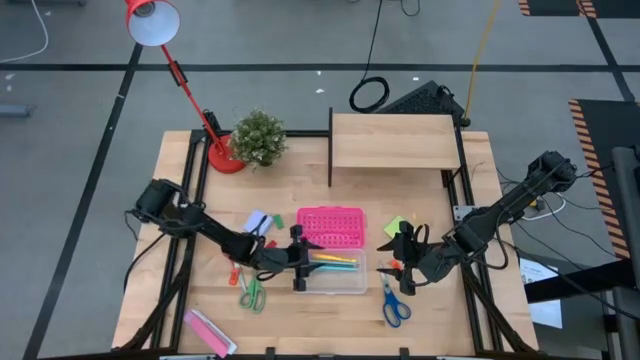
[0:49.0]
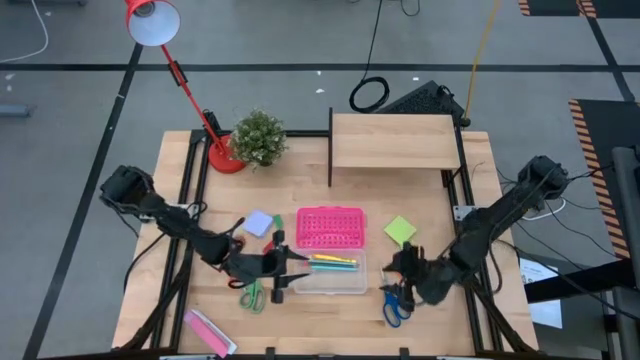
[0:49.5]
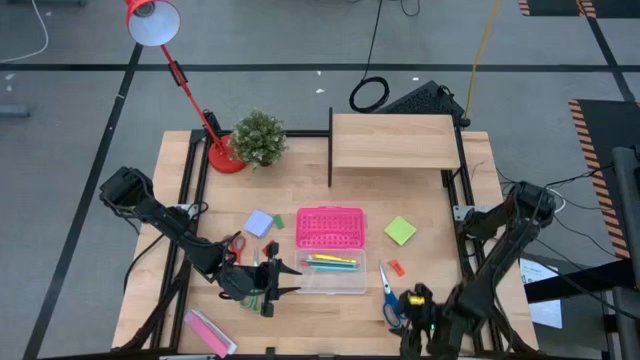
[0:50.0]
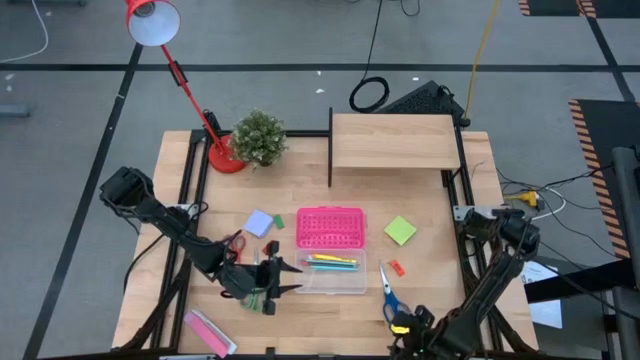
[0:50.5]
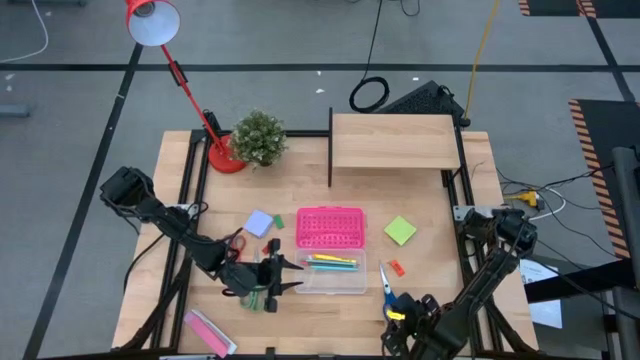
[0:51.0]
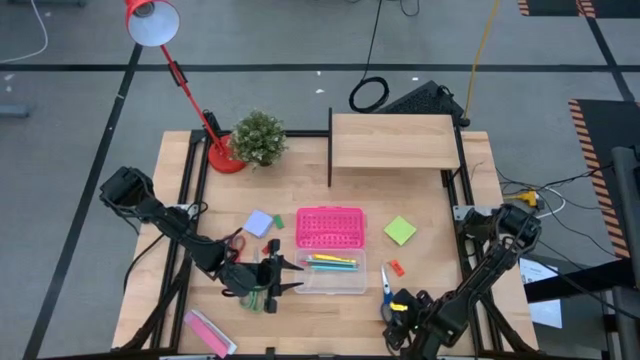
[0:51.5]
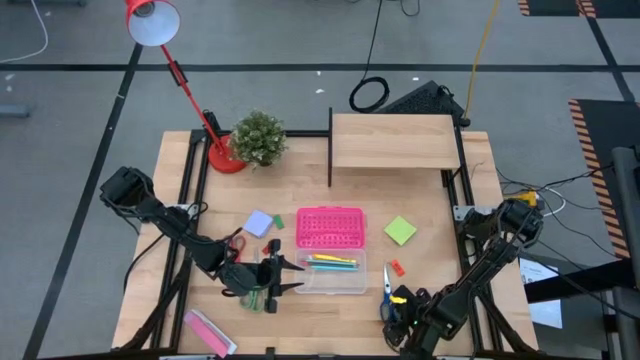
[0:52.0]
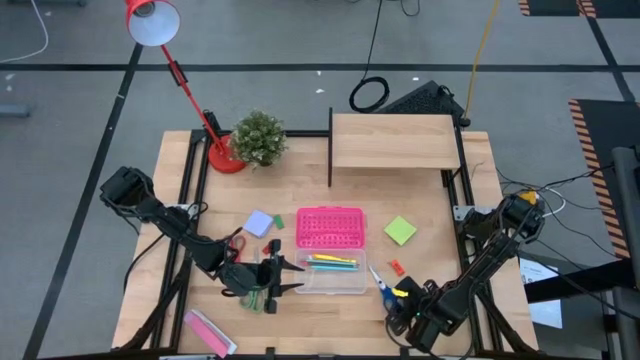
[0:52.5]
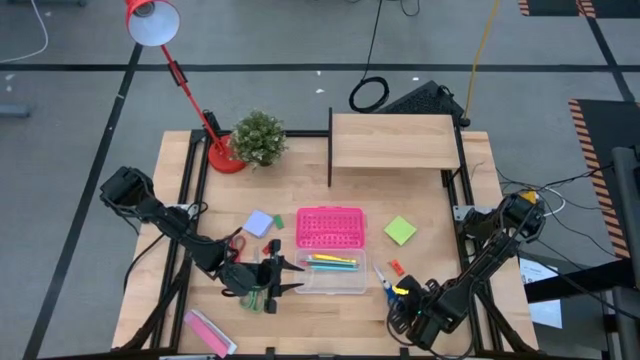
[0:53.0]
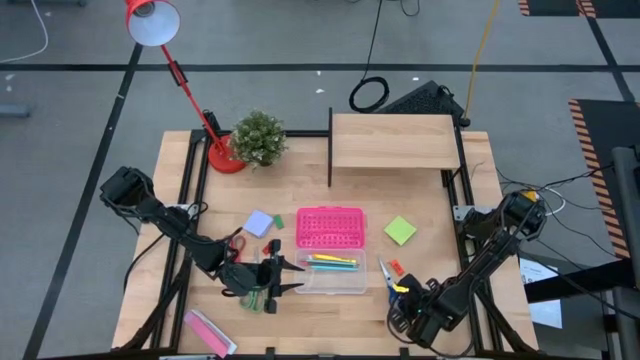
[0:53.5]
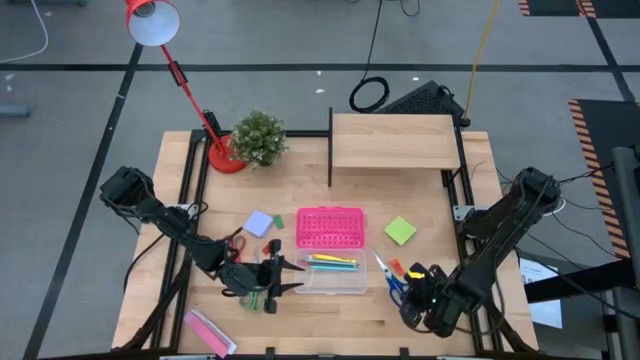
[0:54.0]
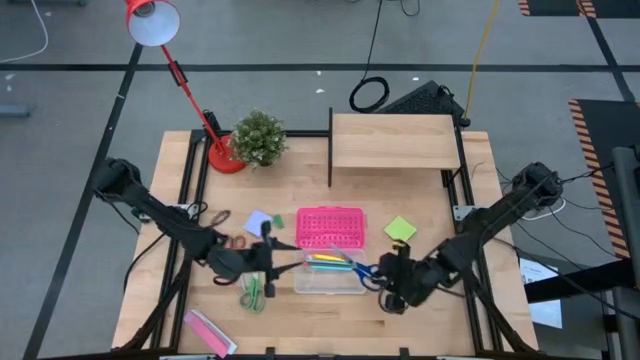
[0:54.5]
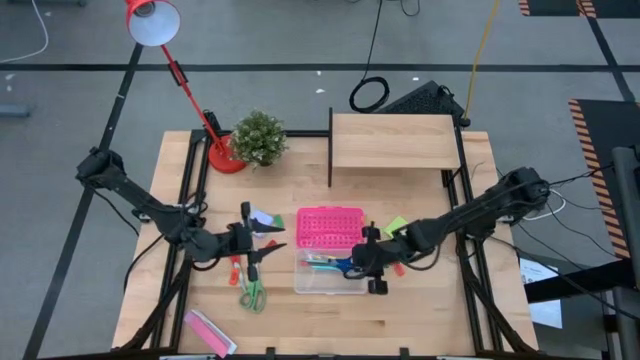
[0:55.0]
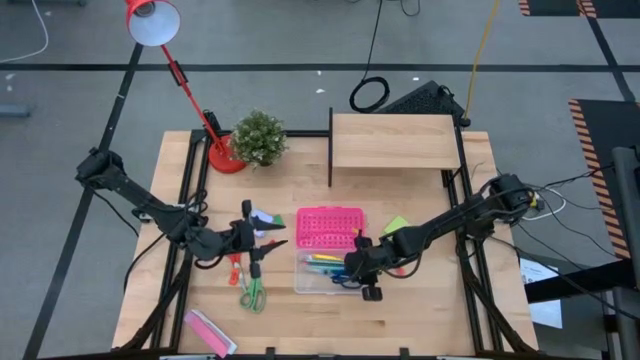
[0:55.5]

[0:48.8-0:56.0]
Task: Pack school essentials
Put the blue scissors into the pink supply box

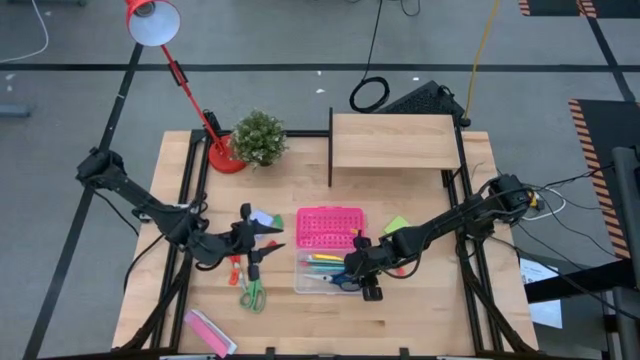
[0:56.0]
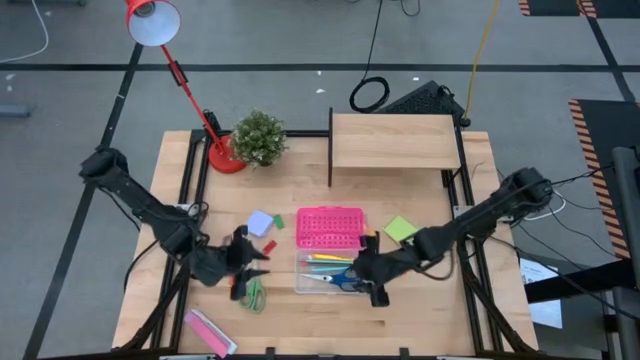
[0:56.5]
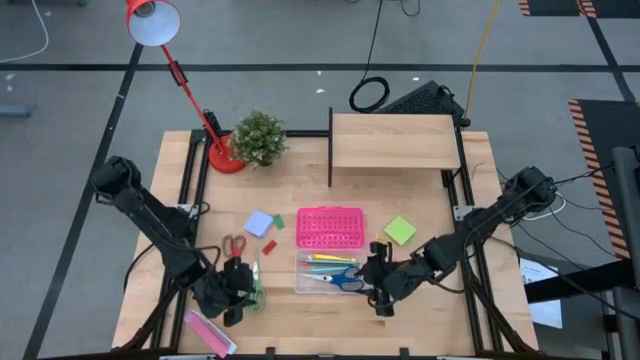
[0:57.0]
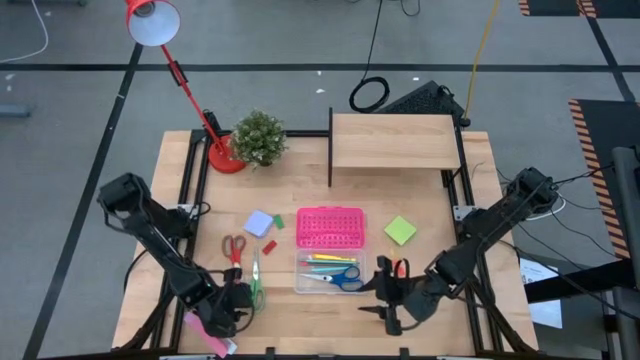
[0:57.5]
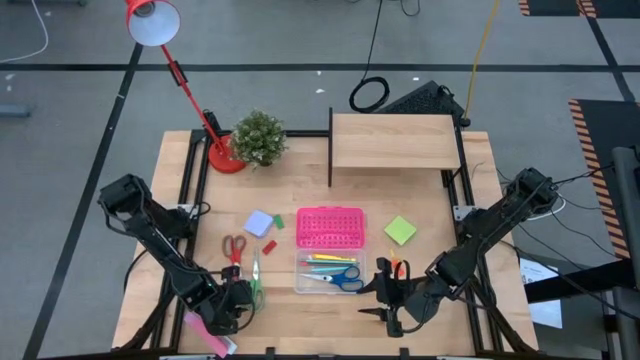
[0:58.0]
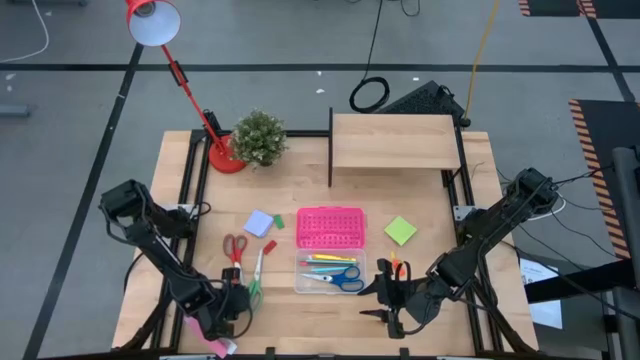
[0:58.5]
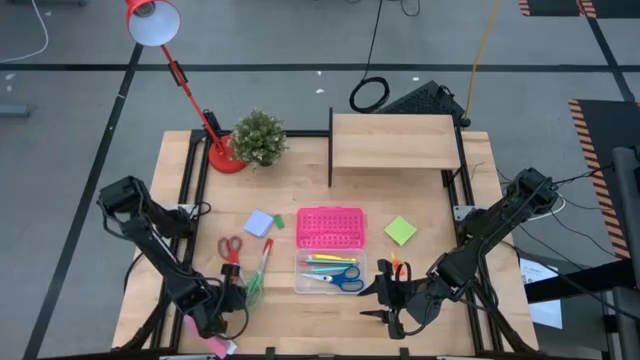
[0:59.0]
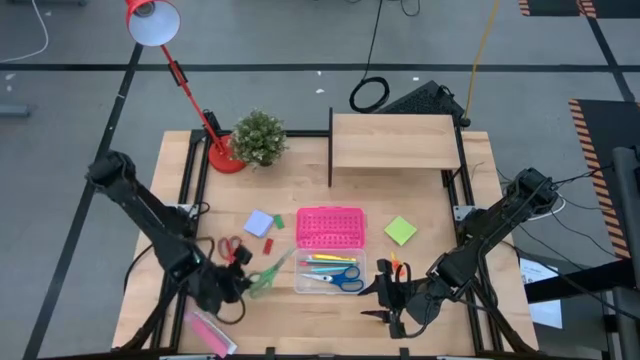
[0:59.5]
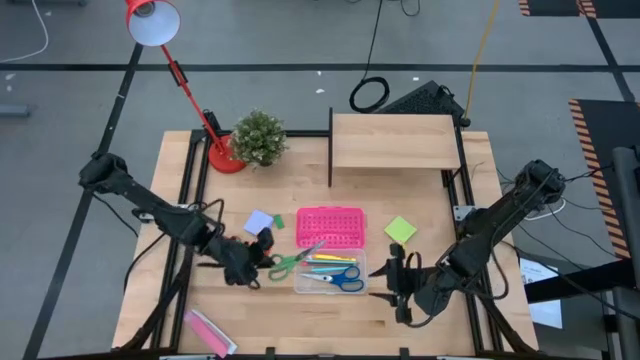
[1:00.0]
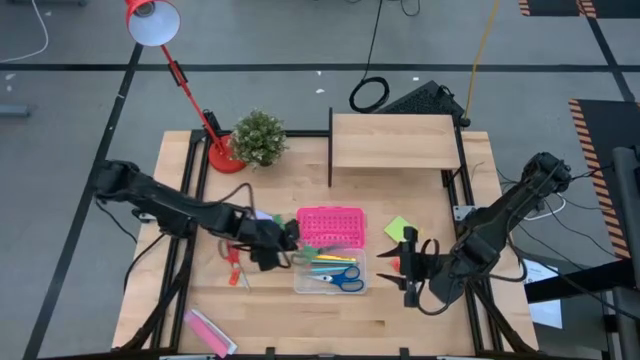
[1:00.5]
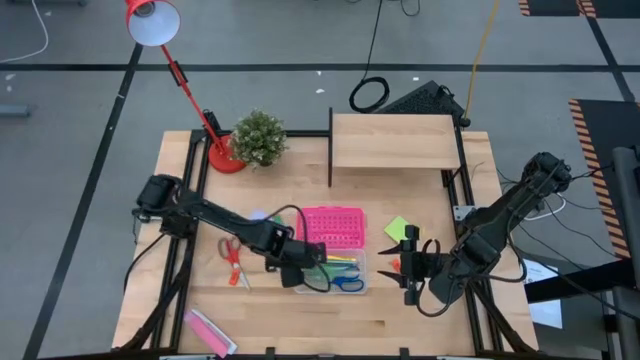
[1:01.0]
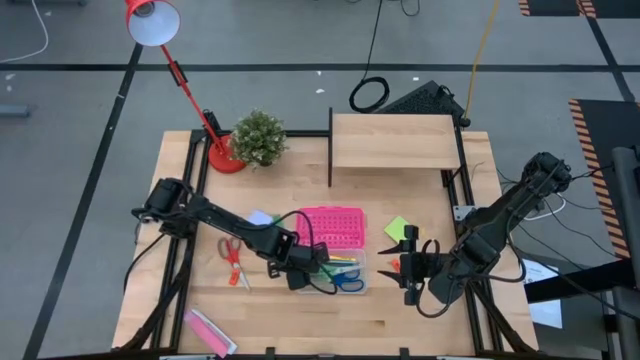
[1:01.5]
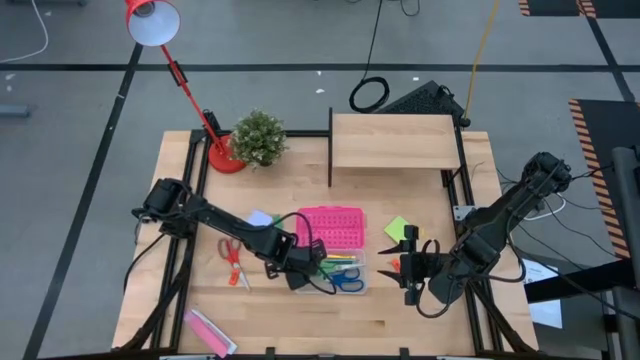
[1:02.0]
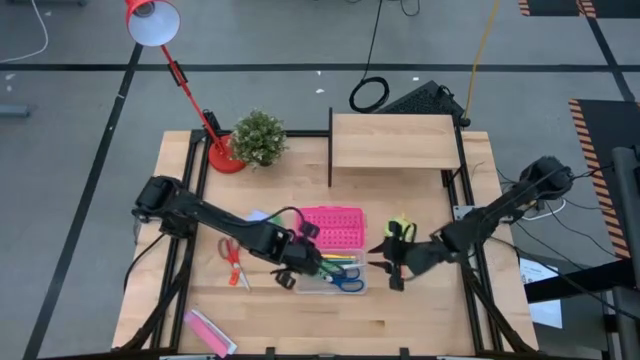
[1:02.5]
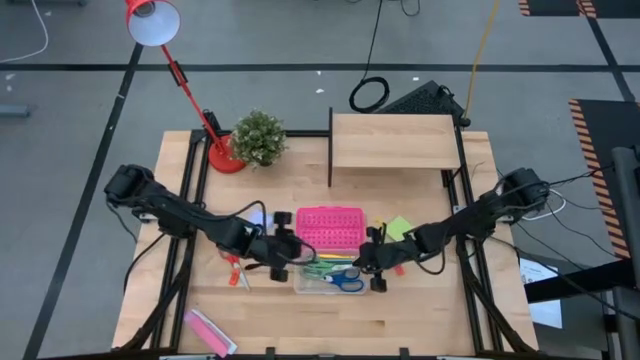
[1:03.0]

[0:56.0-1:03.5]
Put the green scissors into the pink supply box

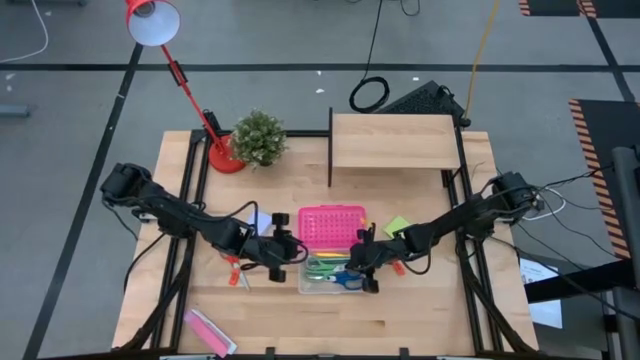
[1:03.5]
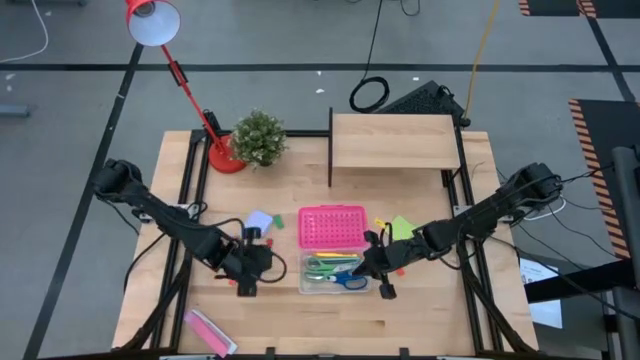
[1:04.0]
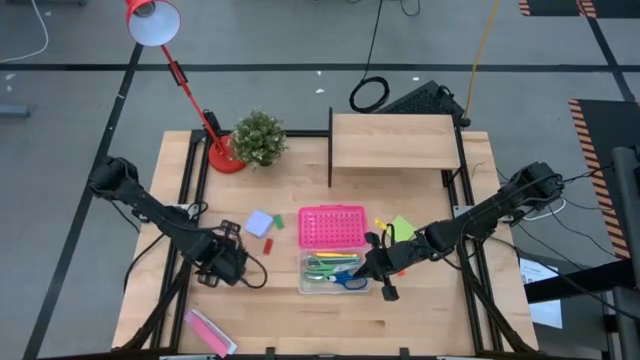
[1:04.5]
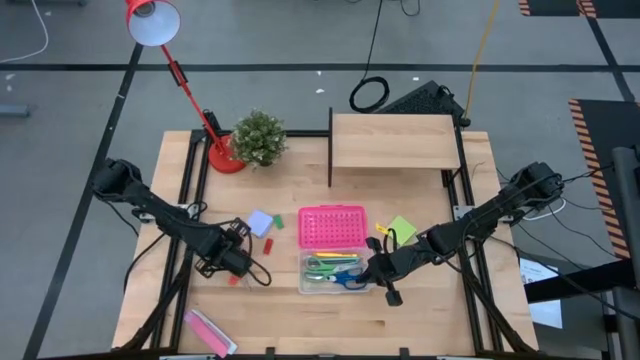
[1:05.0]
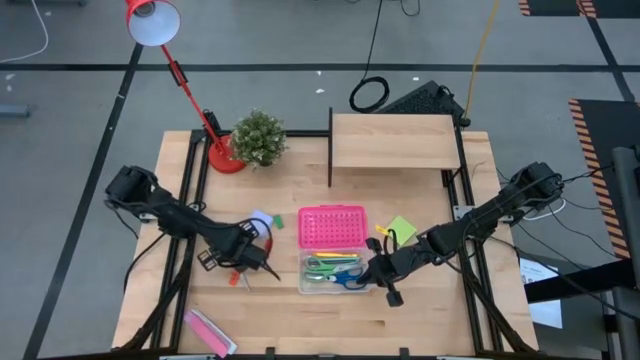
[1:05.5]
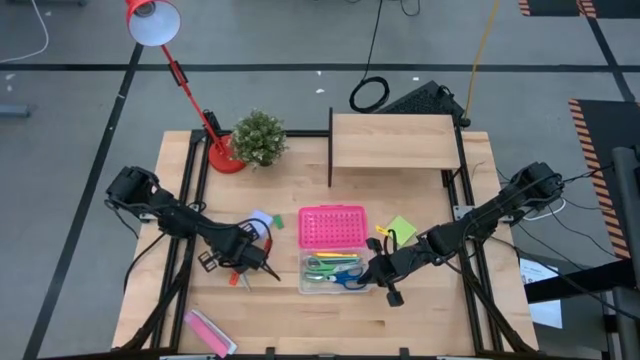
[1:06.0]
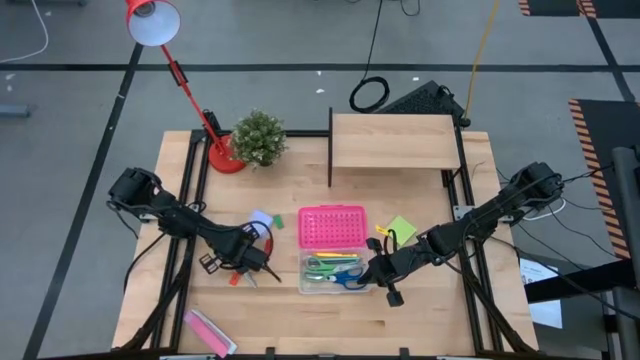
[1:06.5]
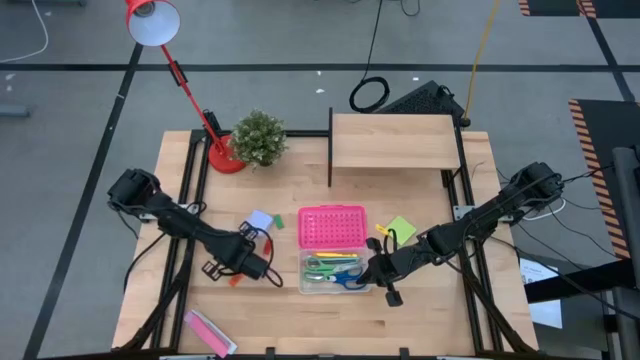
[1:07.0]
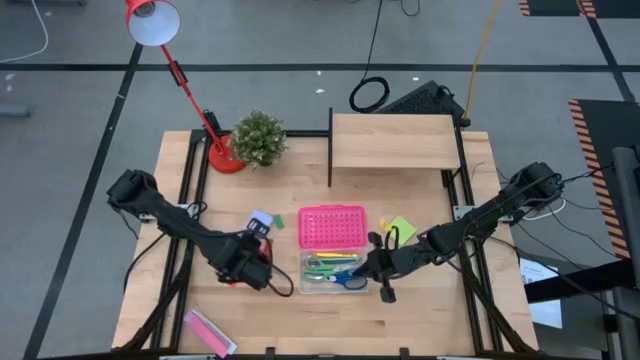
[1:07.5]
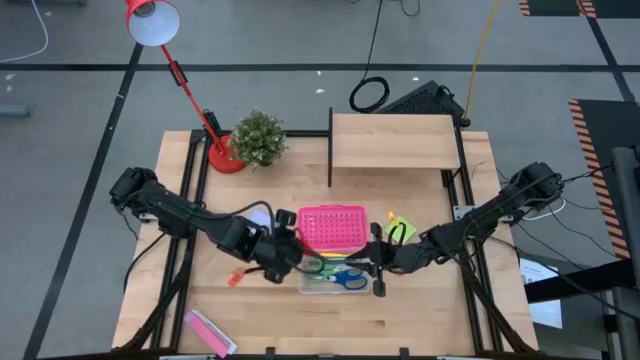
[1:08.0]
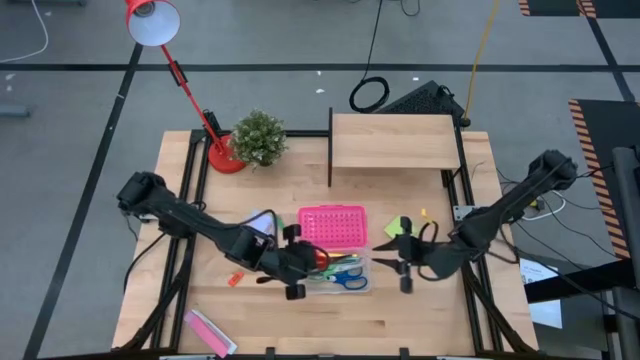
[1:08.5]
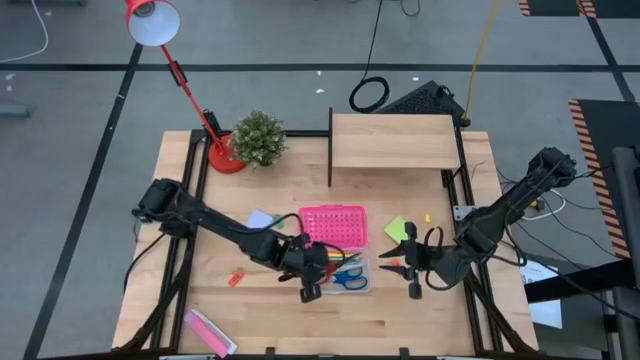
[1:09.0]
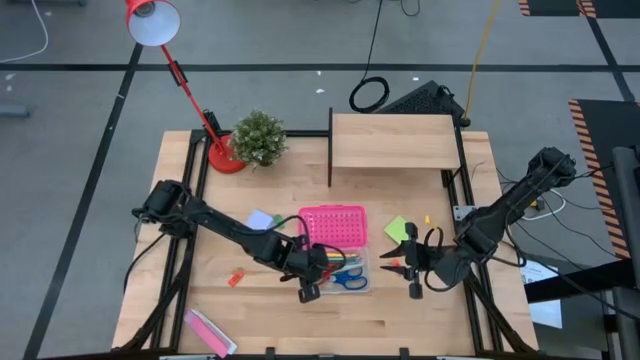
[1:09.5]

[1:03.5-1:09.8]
Put the red scissors into the pink supply box

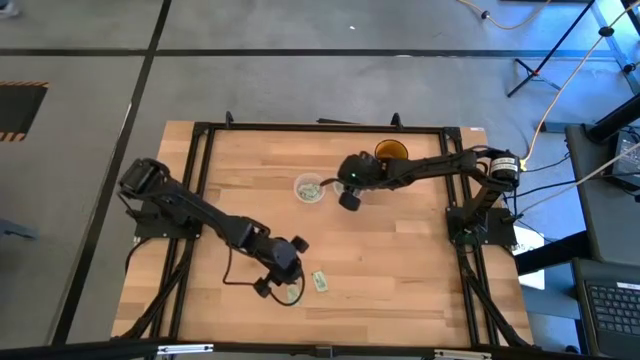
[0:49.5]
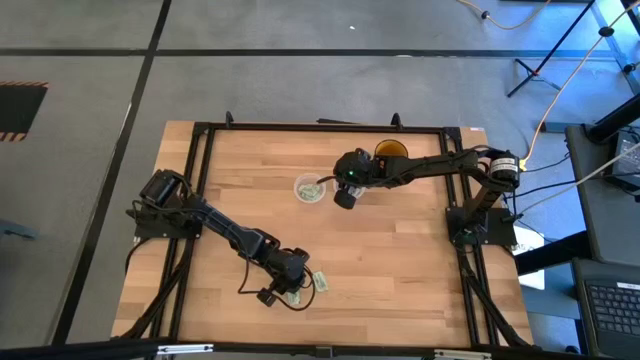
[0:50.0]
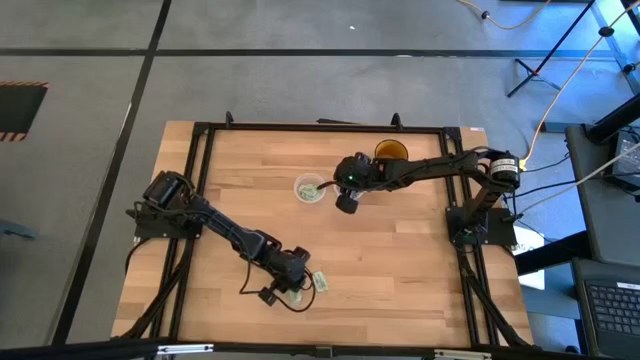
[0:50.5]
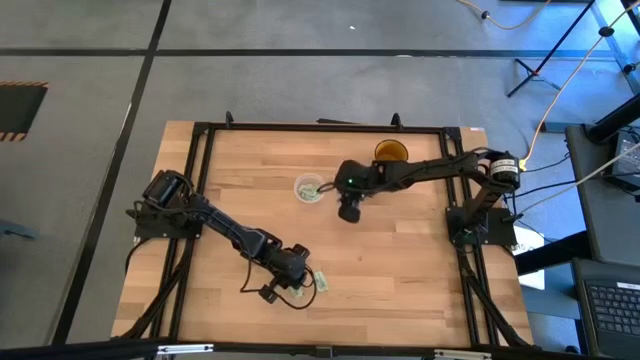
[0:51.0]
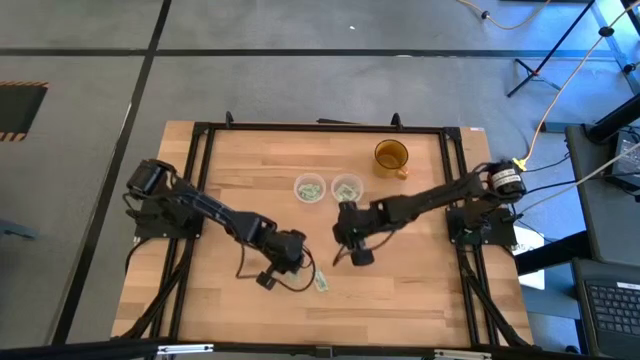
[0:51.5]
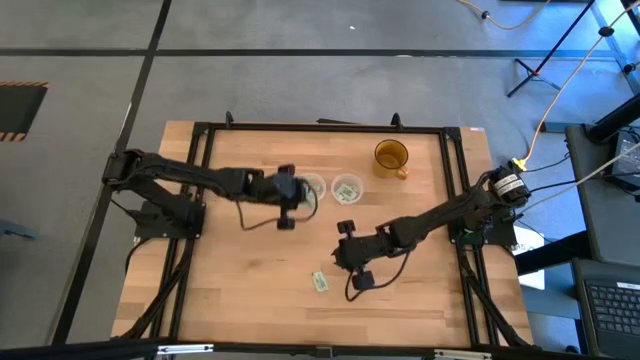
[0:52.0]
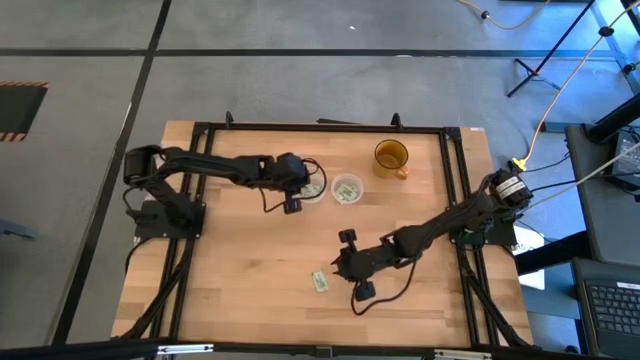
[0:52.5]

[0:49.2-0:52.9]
Task: Pick and place Stevia / Truvia into bins
Put the stevia packet into the left transparent container
